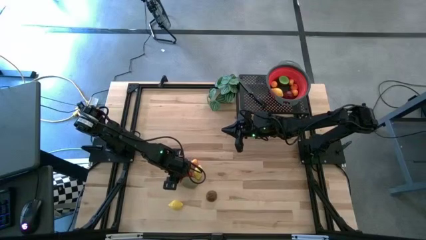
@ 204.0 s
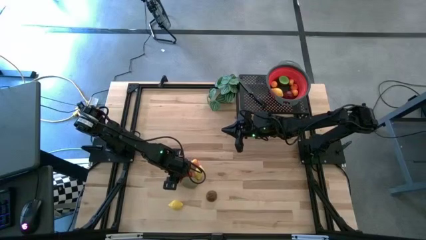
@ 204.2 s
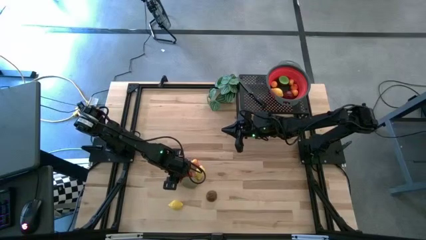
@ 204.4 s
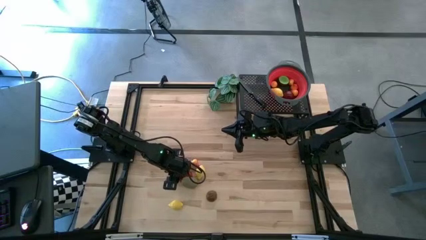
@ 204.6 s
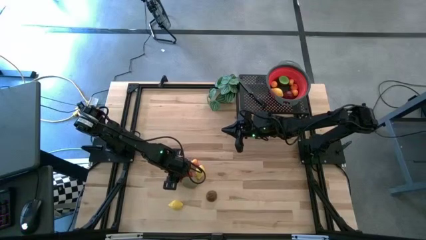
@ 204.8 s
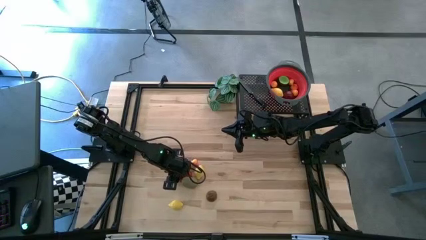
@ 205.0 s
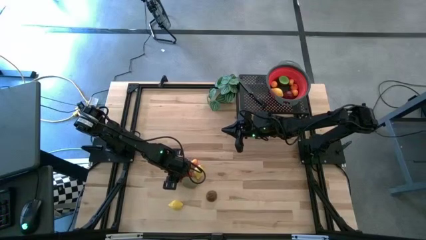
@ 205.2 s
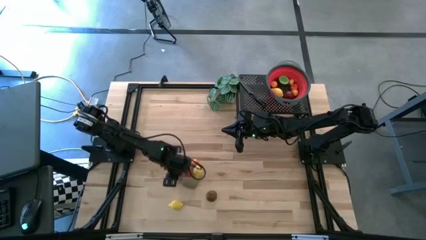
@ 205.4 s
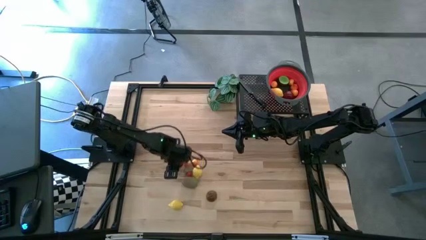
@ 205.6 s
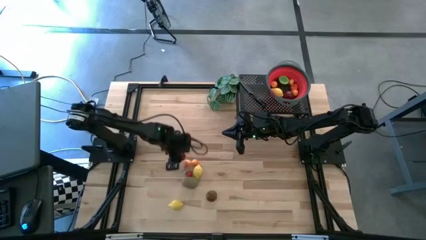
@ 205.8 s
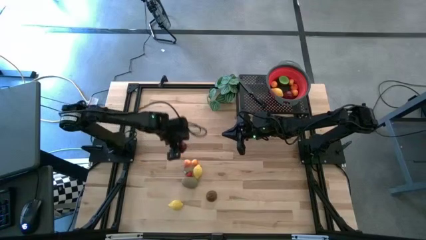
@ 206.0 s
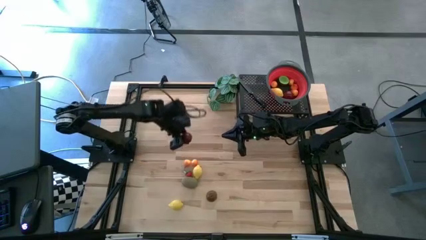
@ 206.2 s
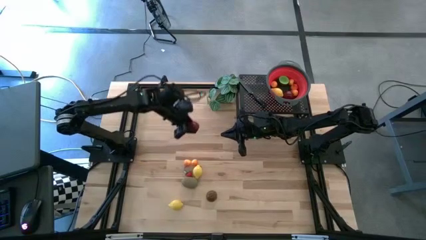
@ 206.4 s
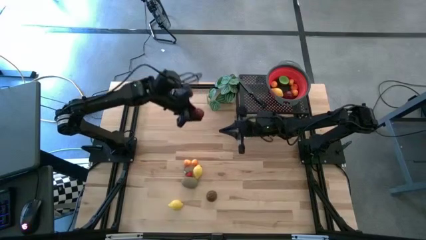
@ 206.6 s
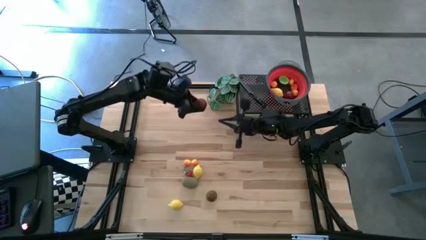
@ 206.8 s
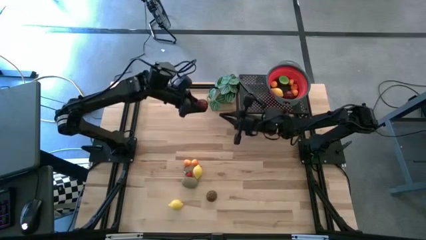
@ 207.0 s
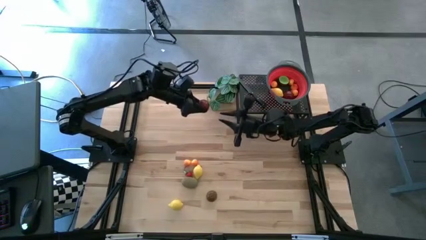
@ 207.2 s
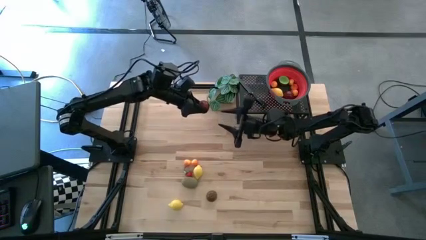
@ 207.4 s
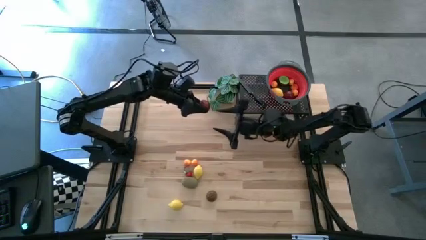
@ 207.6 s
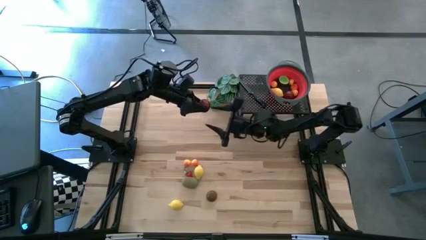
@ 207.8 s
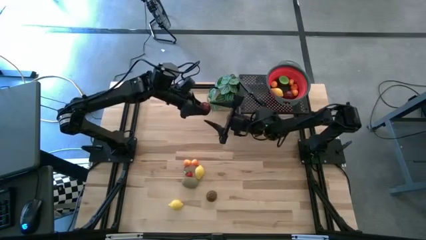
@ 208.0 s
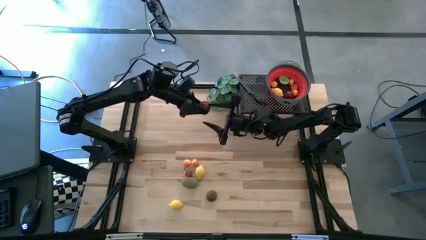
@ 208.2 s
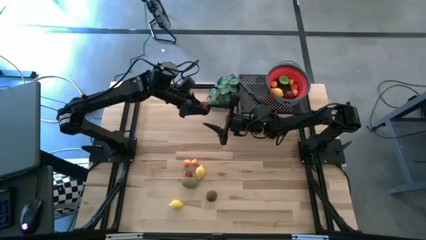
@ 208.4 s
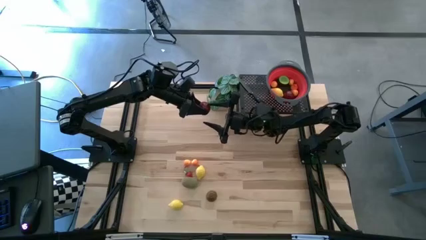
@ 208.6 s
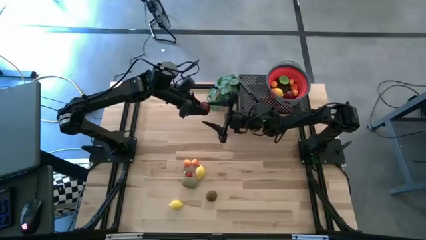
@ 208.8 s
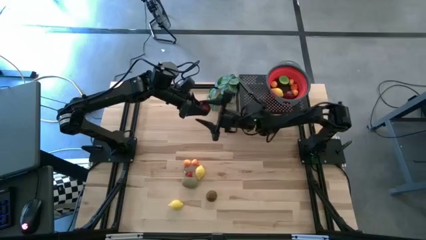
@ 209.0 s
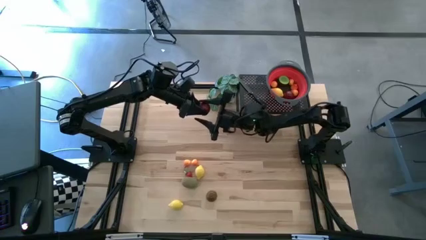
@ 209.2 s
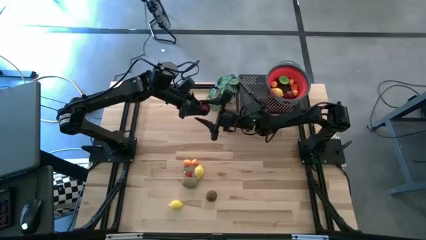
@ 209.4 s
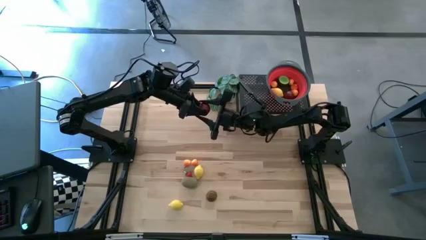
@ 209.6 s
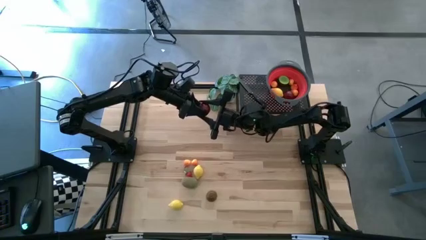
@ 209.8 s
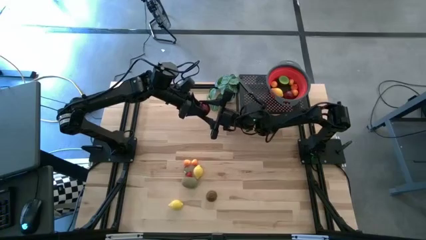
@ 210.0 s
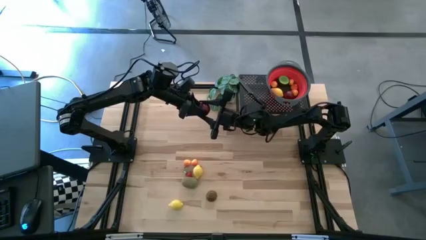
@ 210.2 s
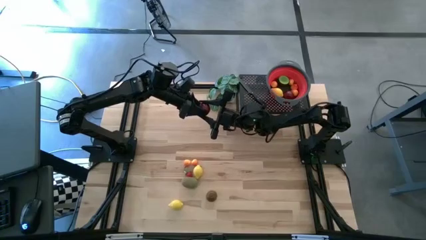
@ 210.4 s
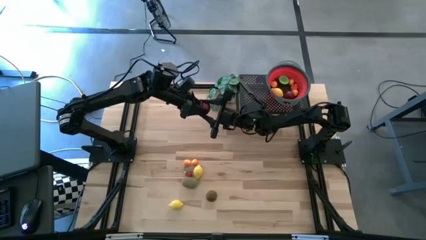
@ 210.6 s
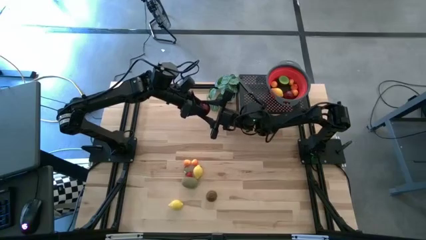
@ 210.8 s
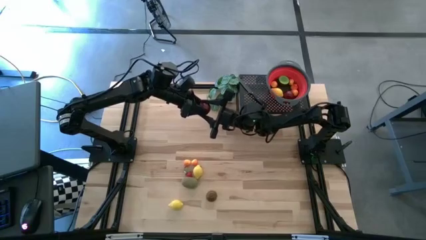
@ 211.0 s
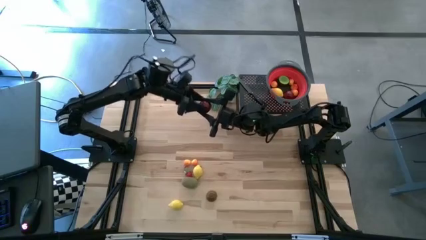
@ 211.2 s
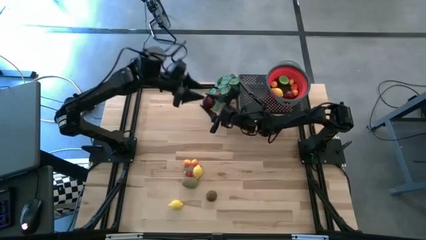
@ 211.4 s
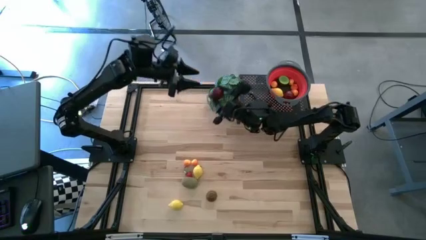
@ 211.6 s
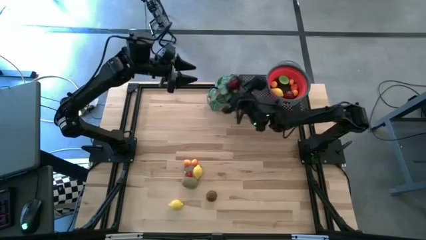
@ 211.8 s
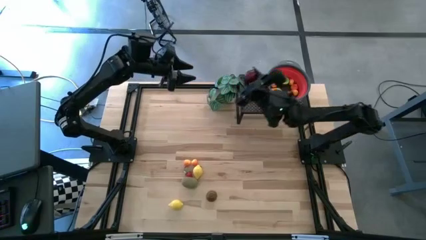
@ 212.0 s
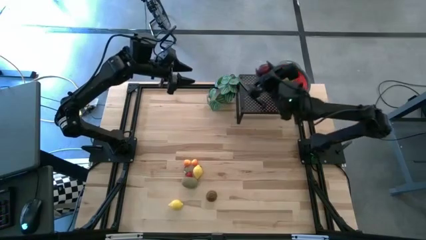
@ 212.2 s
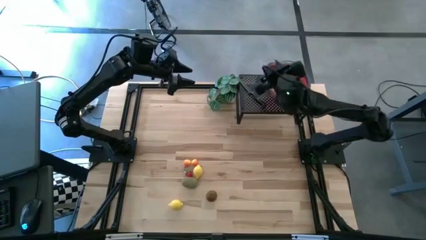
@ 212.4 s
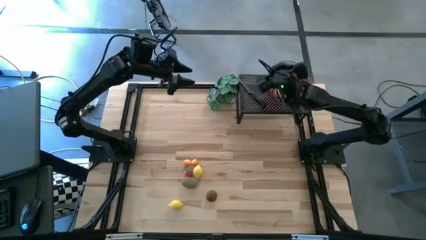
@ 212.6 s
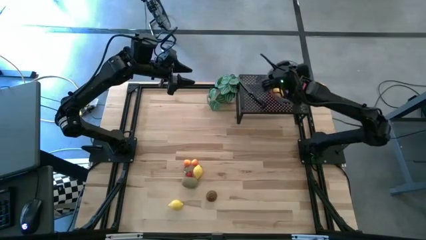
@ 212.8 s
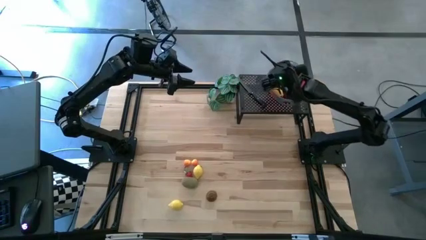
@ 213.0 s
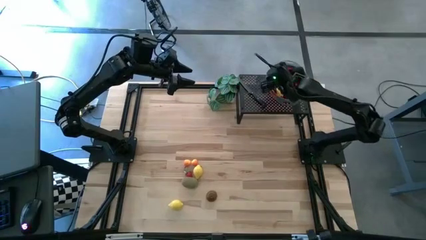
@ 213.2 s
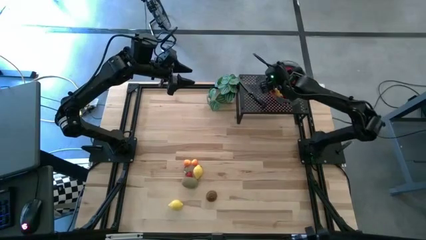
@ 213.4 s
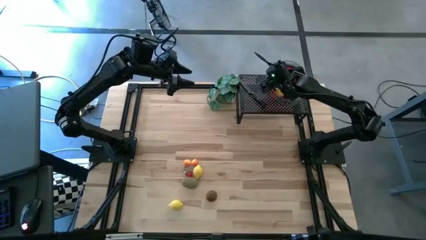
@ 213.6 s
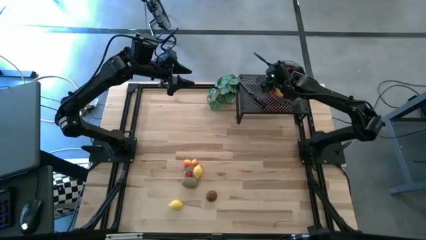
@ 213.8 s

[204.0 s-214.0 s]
Task: Pick & Place Fruit
Put the red pomegranate into the red strainer bowl

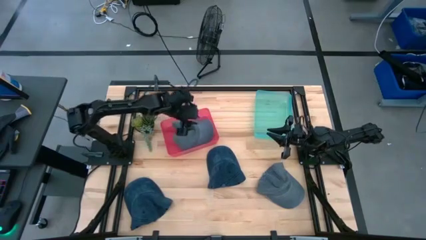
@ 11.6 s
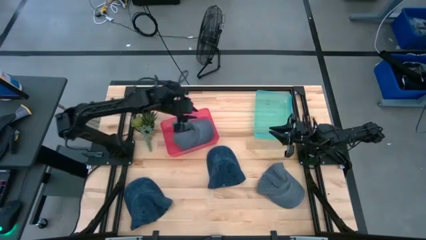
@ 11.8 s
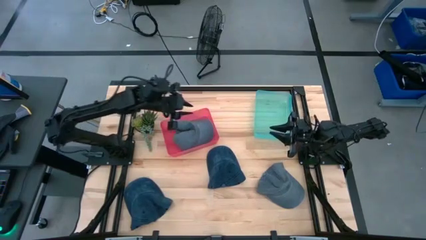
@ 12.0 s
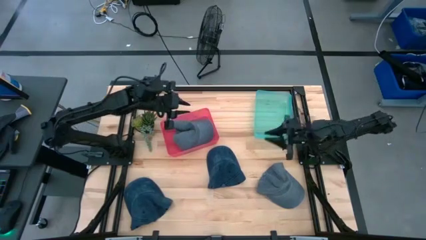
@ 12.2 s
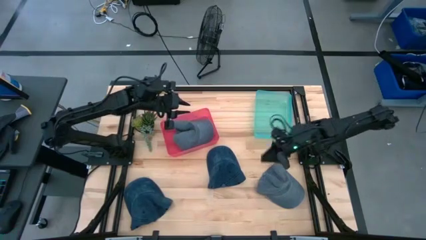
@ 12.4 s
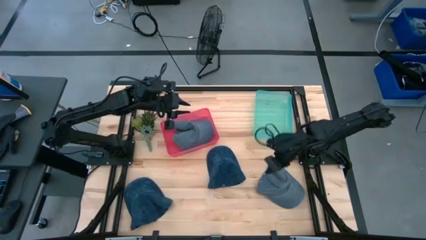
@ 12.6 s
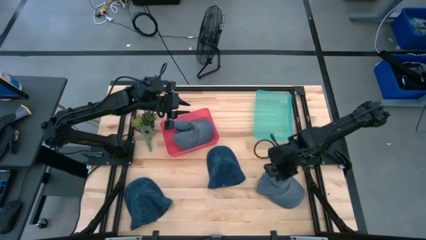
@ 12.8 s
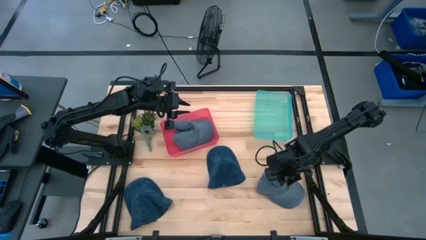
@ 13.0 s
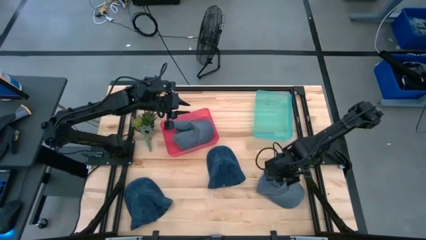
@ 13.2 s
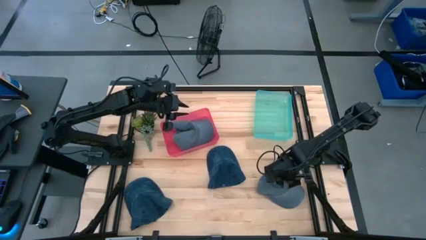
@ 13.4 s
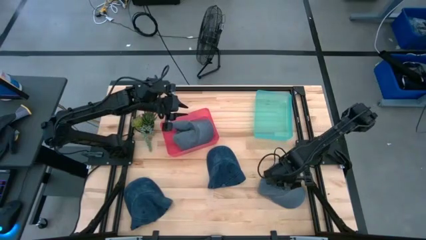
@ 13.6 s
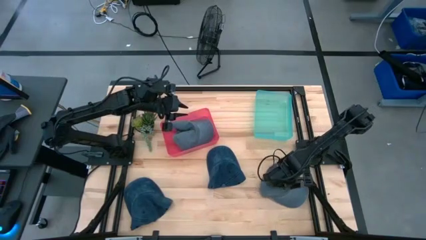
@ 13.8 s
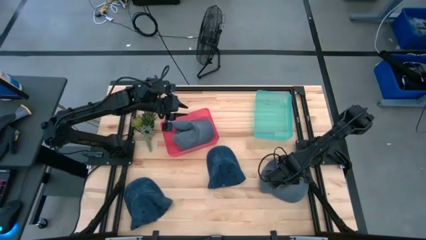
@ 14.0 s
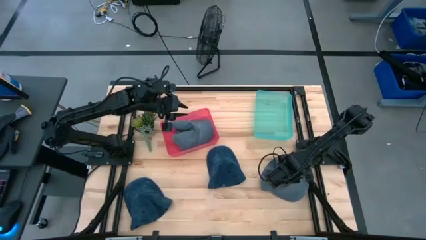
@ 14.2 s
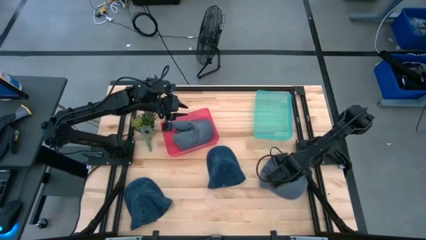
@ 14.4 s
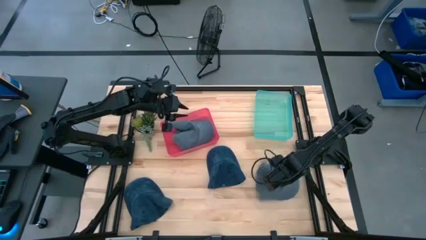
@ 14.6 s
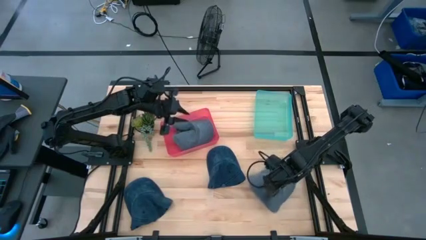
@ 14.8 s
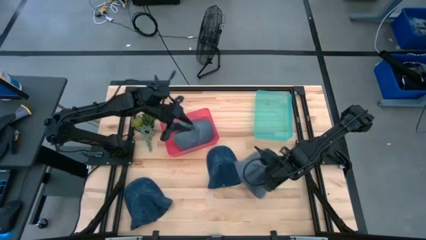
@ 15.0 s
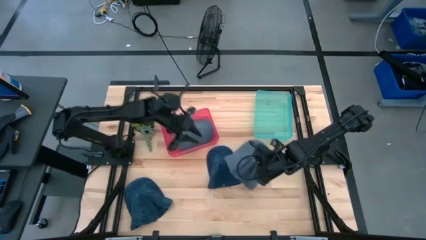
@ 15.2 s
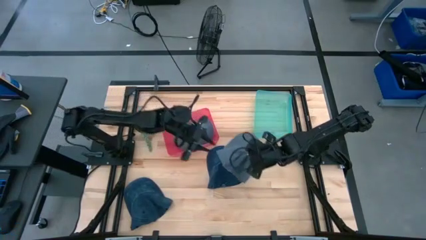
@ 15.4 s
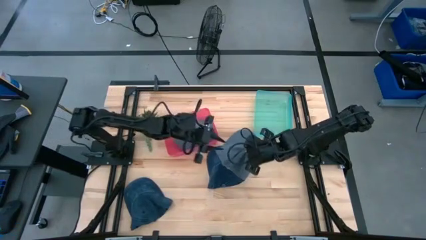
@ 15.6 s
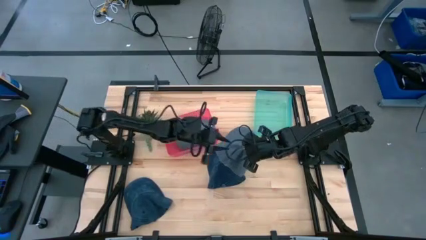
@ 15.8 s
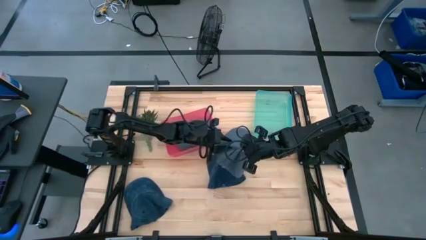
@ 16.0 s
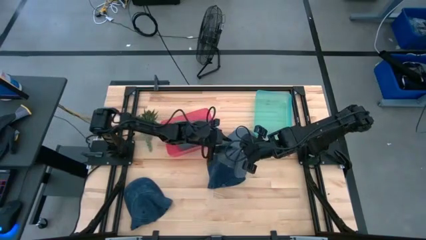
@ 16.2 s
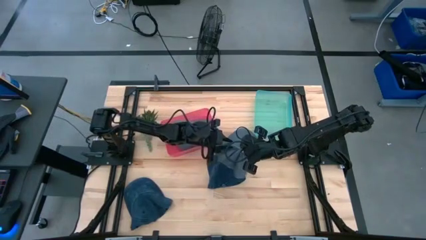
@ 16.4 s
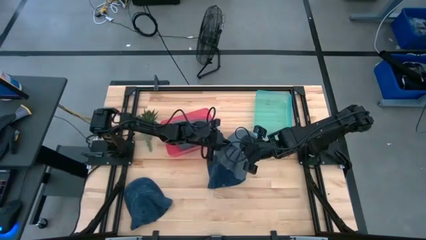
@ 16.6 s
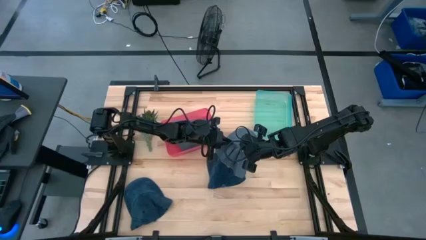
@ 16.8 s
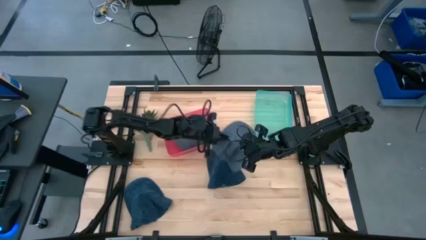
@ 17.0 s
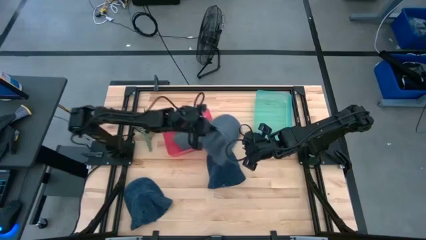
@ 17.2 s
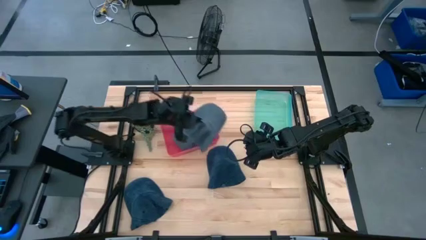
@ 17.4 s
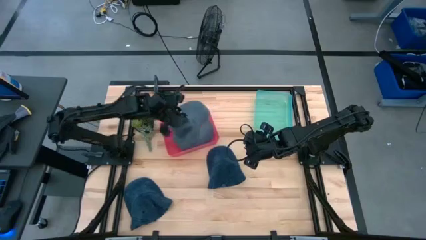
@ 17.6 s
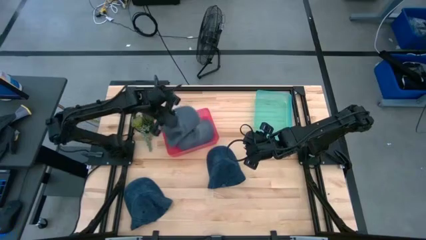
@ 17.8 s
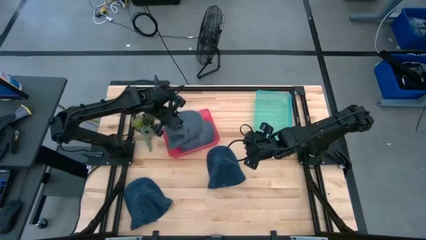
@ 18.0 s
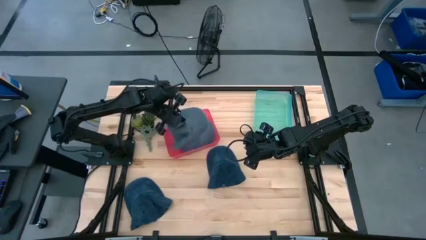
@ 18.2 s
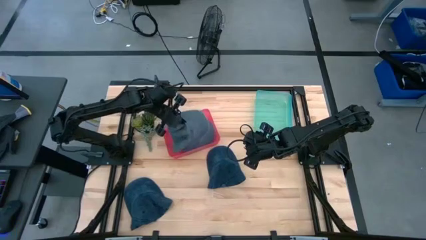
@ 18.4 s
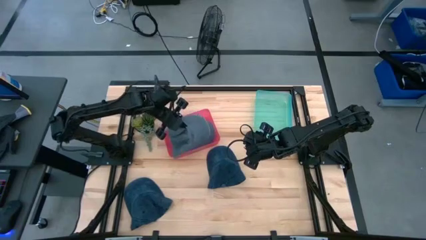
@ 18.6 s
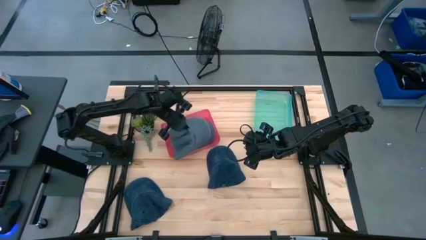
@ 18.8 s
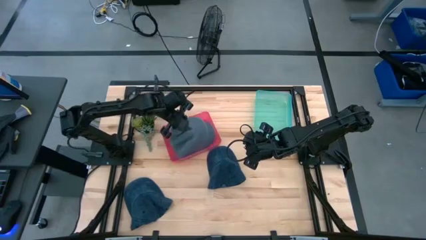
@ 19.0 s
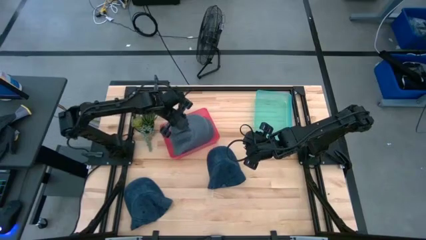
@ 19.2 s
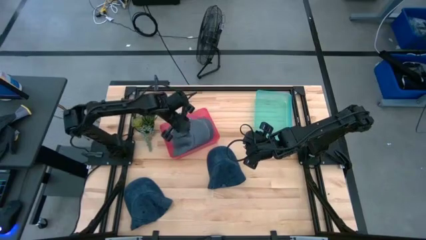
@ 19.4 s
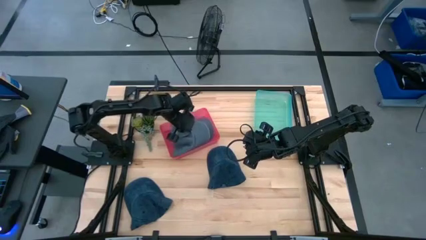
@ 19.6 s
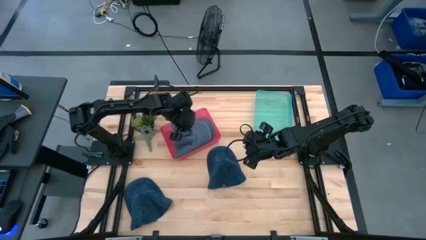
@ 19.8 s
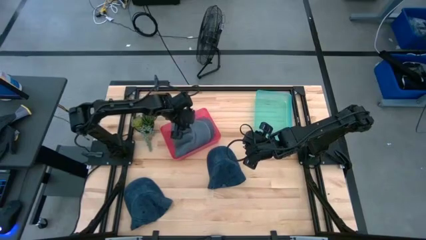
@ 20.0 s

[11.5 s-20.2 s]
Task: Pick & Place hat
Put the gray cap into the red bin
